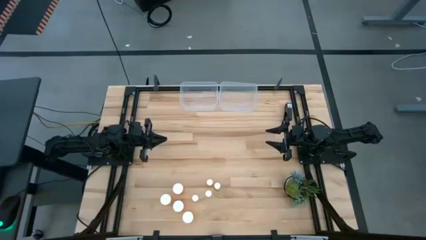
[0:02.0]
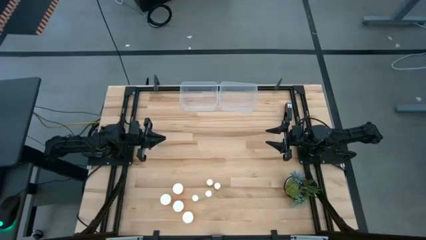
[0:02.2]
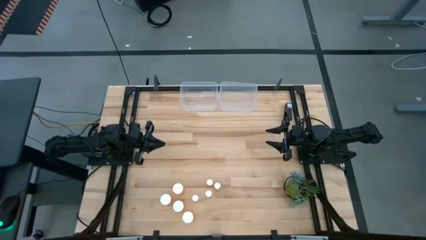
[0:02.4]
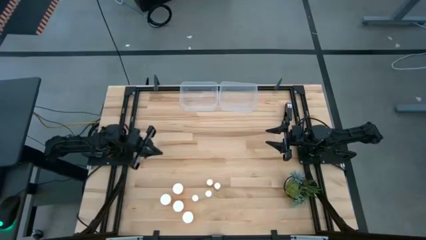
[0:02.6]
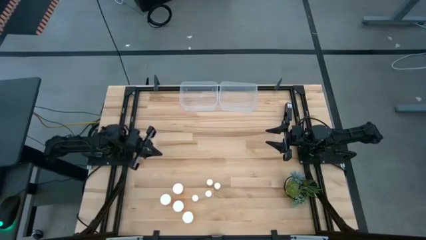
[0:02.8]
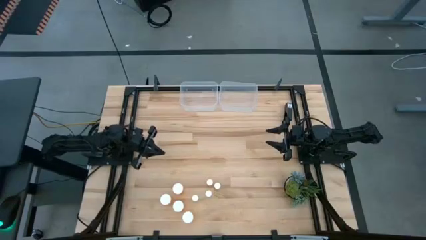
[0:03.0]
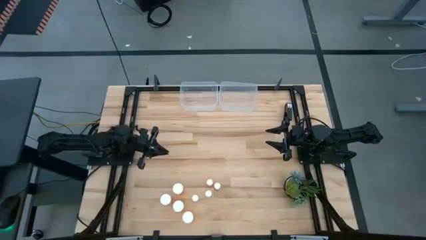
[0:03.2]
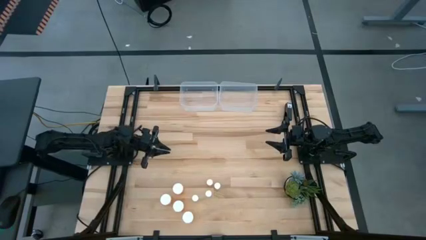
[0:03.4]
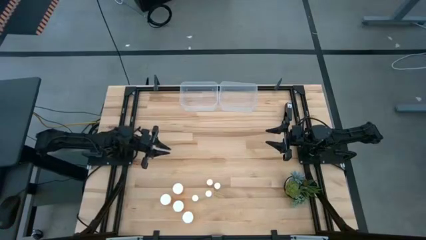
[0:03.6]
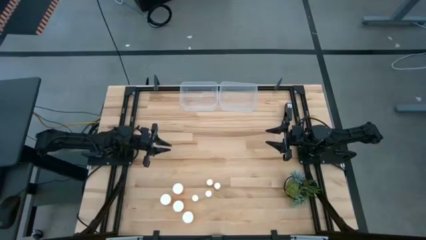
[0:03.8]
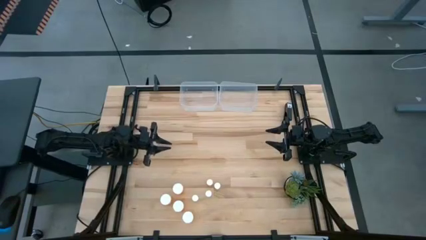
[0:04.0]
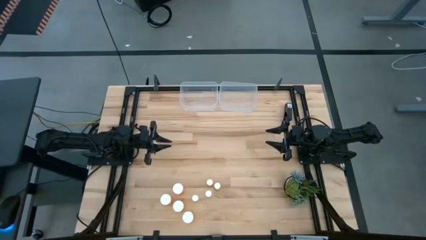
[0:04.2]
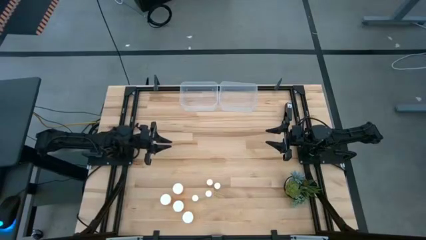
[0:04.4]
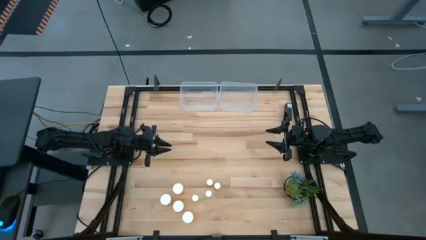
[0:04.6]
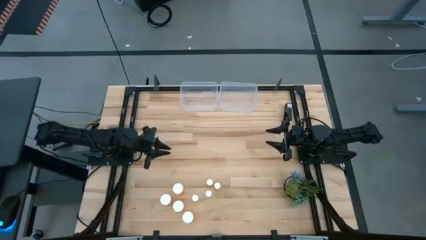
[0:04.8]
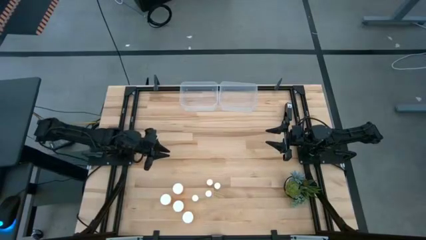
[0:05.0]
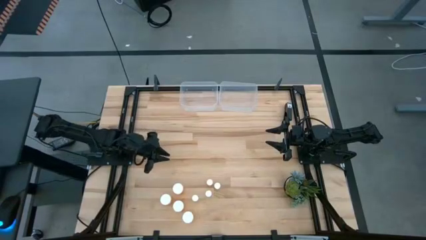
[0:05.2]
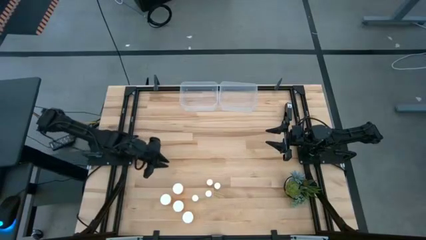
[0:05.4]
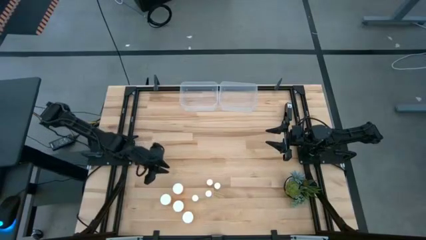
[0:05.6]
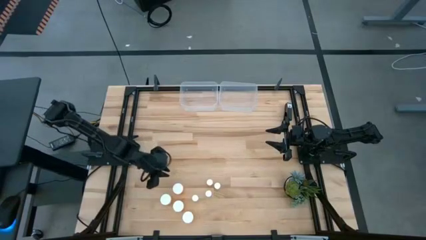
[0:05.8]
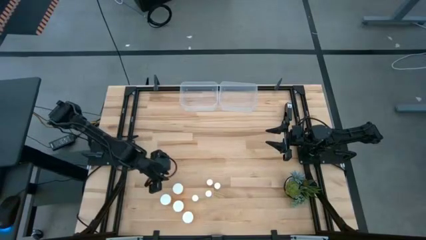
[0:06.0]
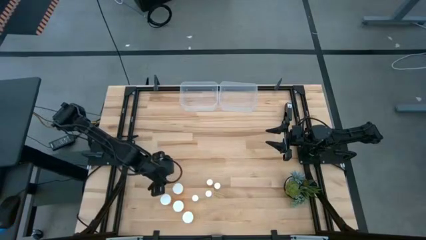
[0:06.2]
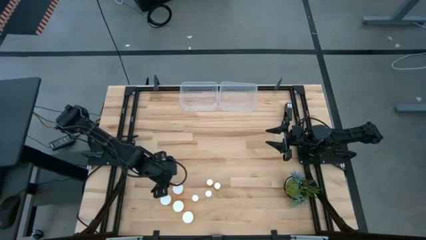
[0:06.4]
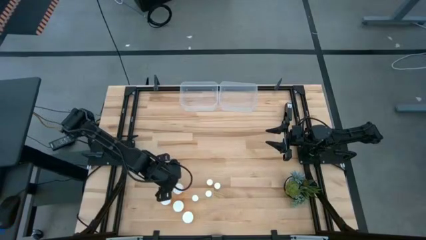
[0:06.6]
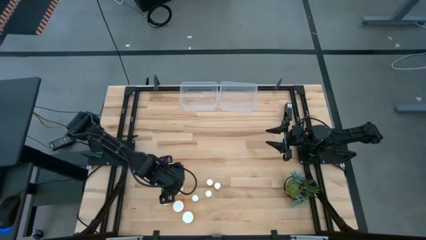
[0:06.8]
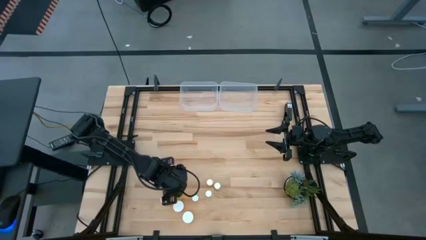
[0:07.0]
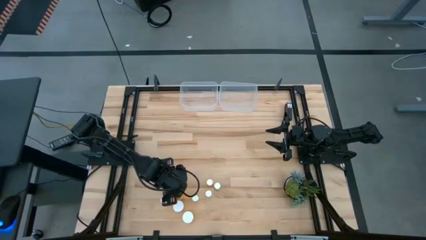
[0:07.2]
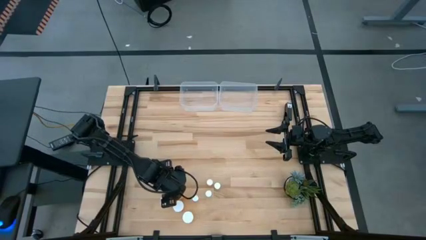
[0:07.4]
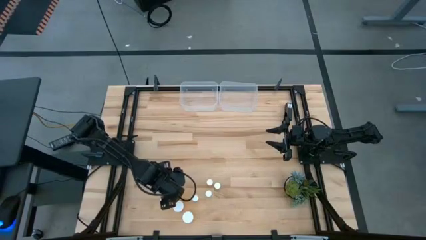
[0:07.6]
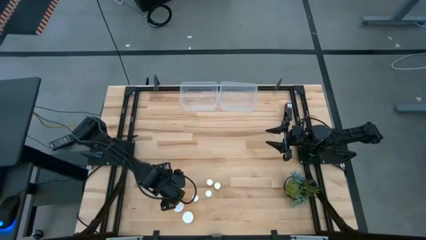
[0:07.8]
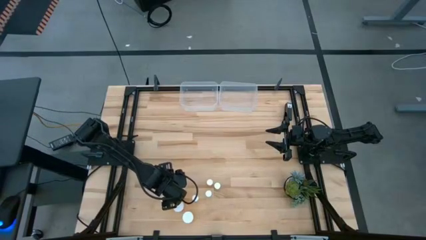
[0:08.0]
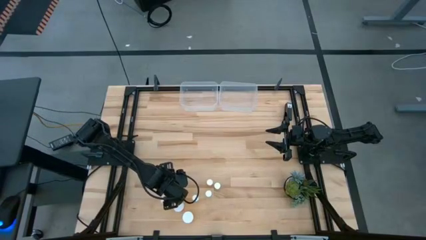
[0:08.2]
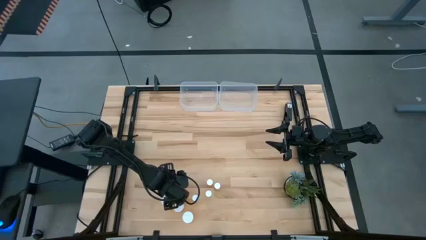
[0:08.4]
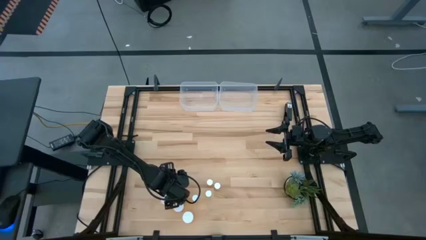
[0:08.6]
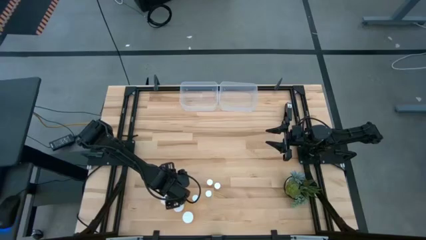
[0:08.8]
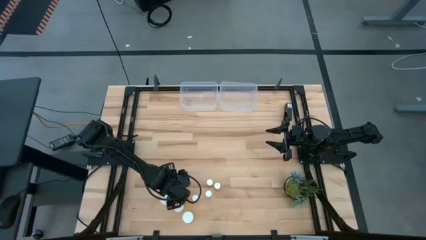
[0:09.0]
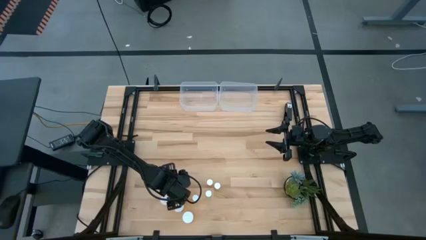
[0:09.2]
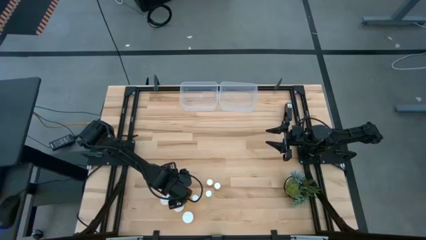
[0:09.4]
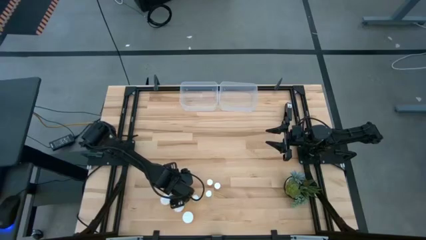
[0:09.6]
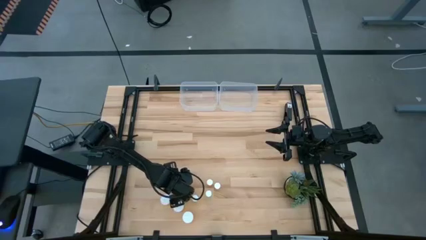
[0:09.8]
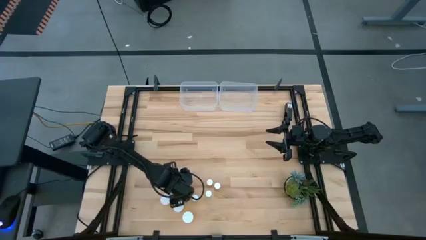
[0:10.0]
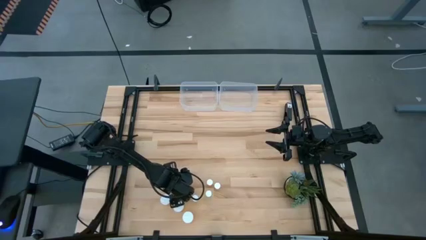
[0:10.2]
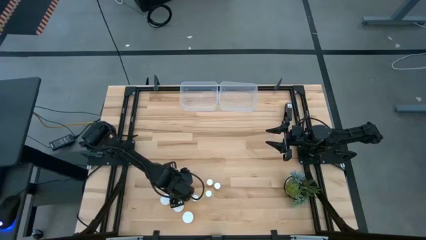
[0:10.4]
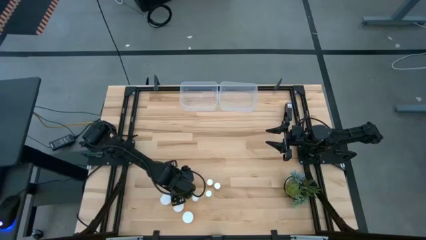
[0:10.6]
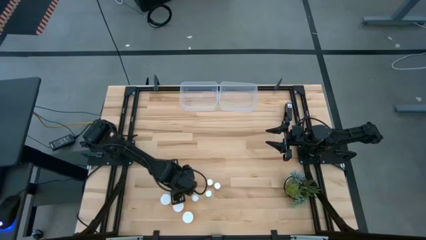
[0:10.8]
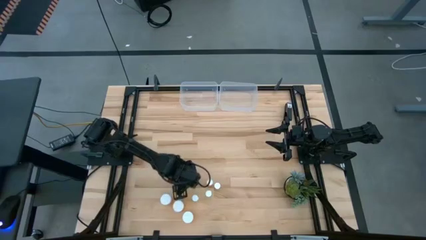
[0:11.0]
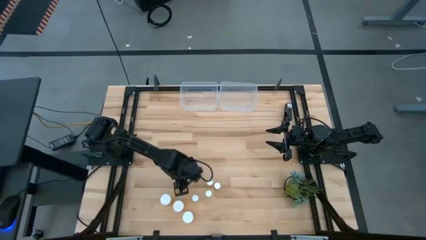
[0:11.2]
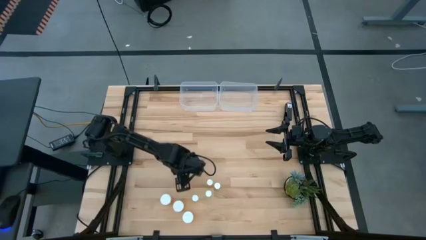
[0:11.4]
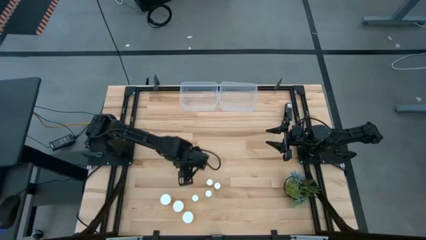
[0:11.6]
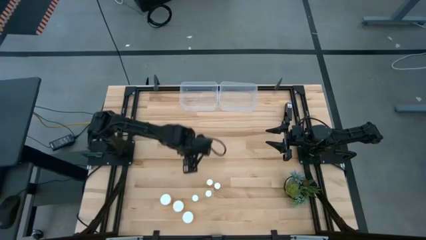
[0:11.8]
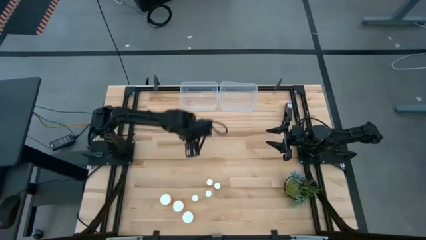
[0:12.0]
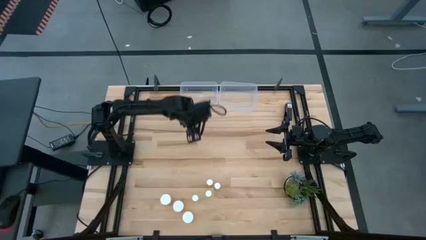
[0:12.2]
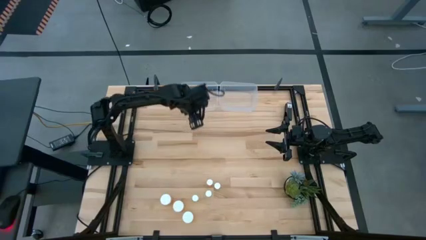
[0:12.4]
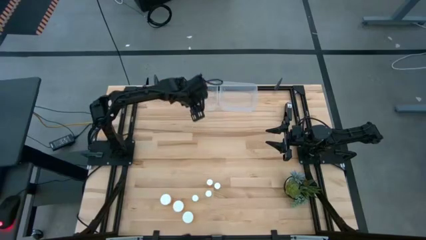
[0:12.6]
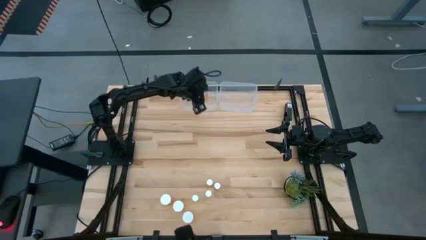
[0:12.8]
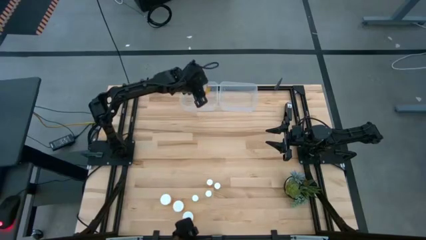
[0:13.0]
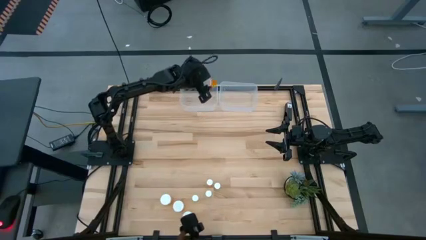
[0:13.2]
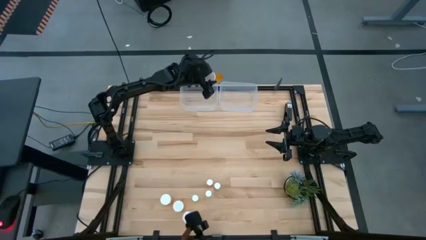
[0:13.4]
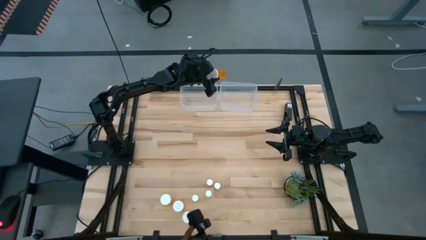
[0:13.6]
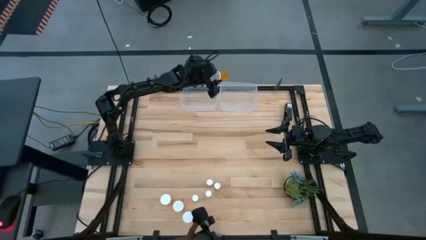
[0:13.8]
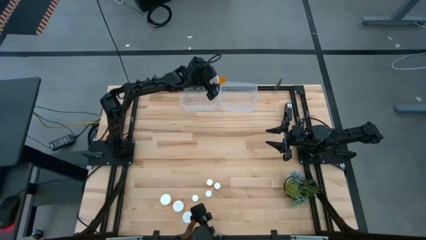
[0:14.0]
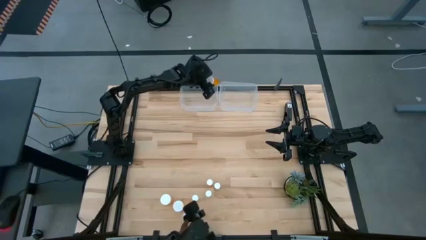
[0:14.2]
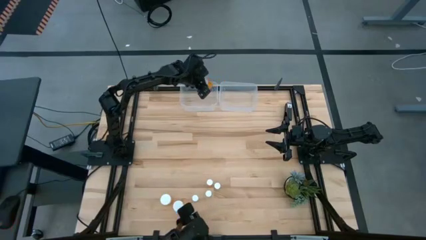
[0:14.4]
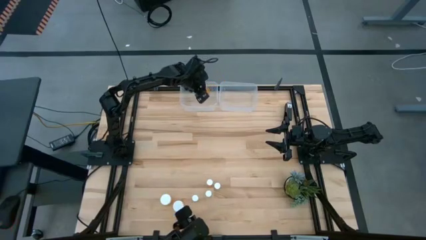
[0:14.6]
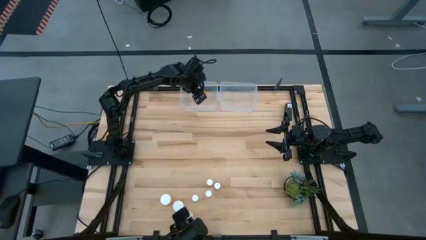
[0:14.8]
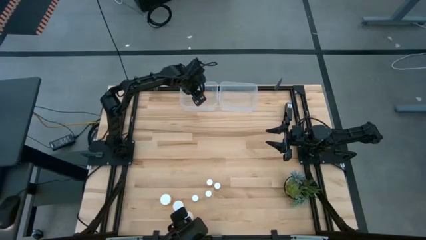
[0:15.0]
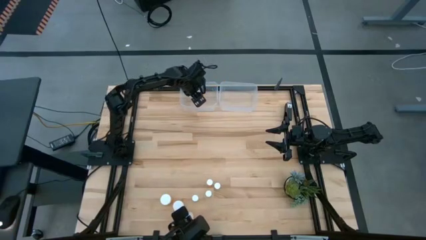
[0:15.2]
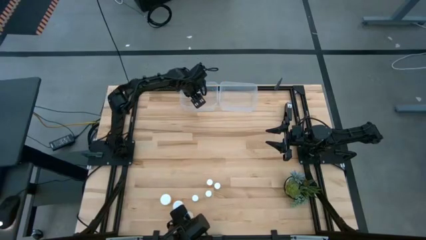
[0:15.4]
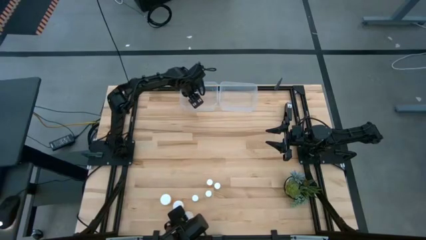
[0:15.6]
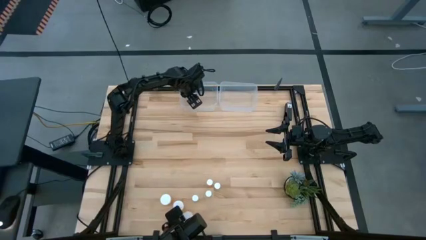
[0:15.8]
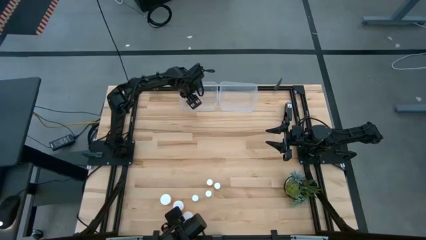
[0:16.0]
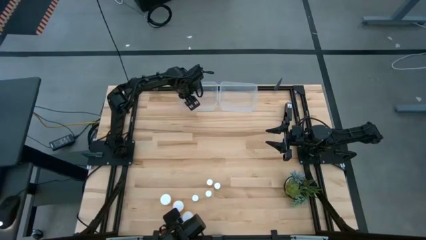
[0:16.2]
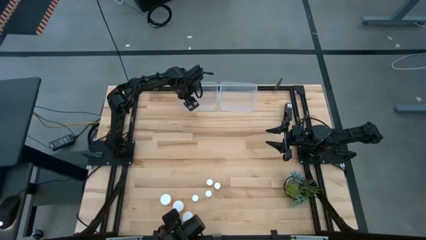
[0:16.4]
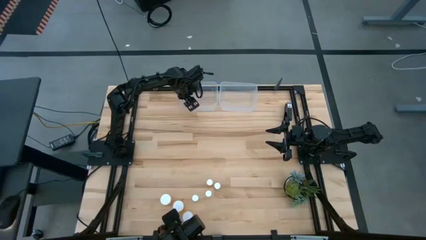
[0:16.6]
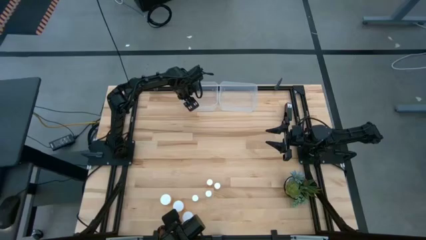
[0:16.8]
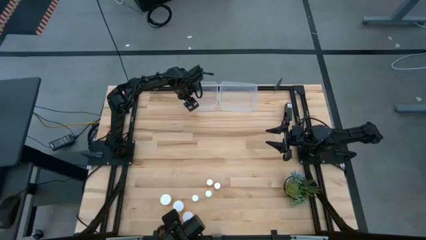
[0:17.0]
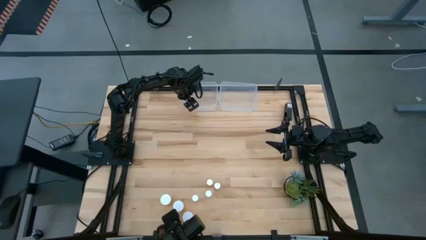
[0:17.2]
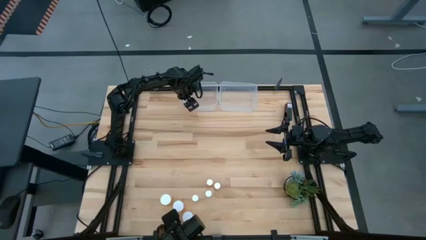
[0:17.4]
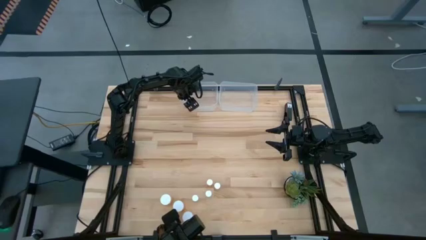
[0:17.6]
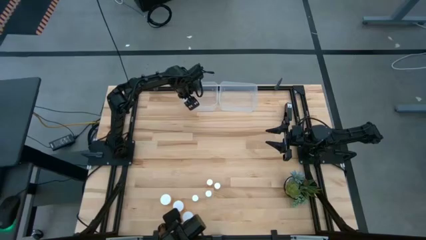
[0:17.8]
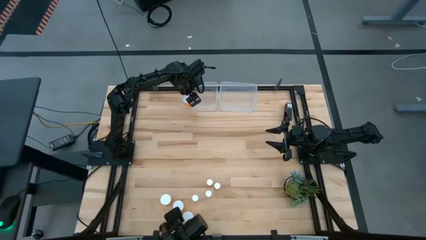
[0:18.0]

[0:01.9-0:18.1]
Task: Pick and place medicine bottles into bin by pill shape (circle, oval)
Put the large orange pill bottle into the left transparent bin
